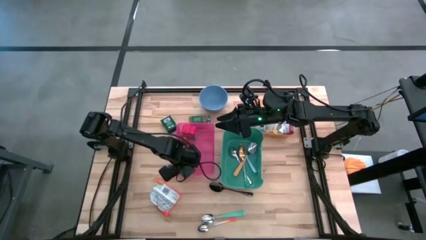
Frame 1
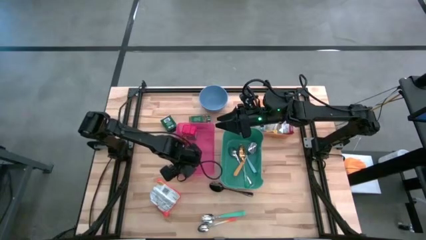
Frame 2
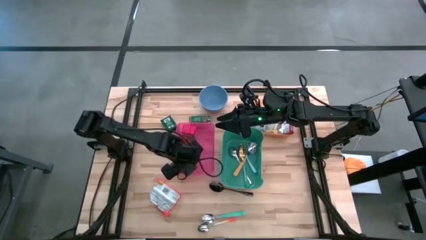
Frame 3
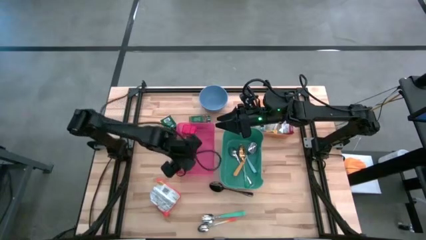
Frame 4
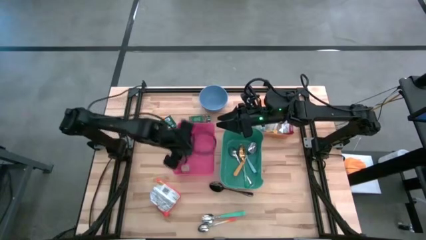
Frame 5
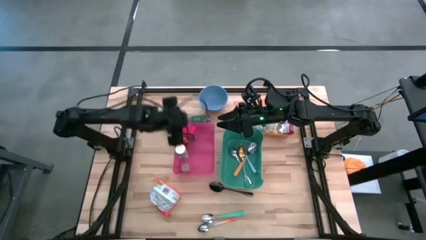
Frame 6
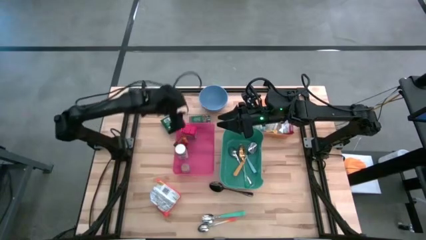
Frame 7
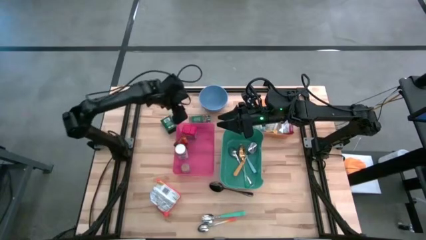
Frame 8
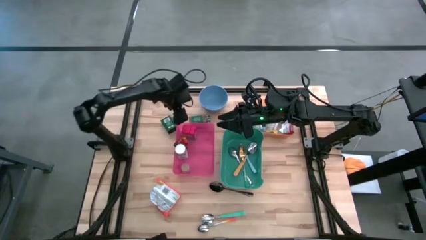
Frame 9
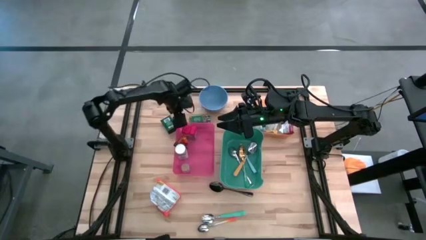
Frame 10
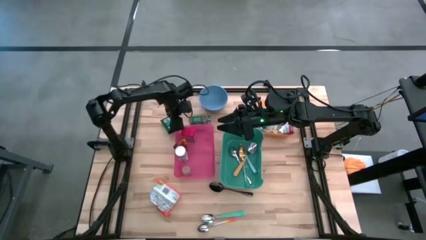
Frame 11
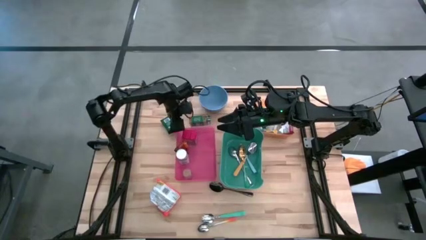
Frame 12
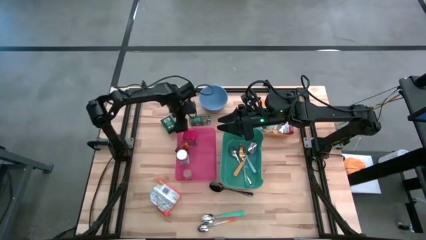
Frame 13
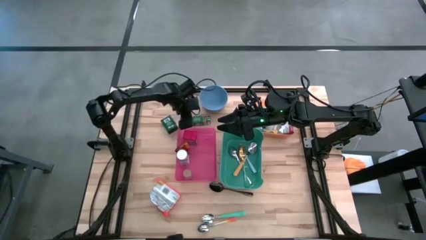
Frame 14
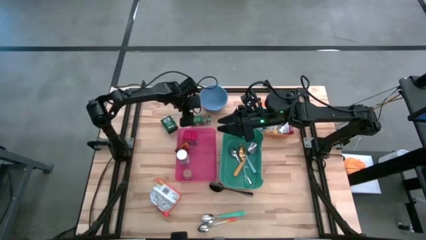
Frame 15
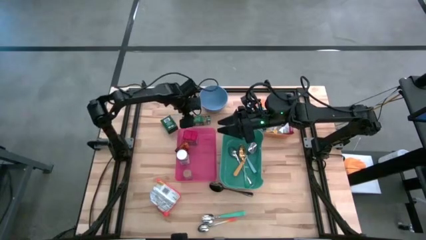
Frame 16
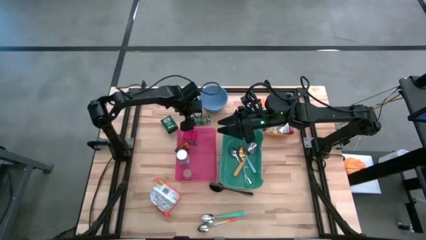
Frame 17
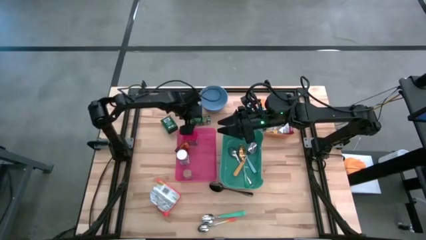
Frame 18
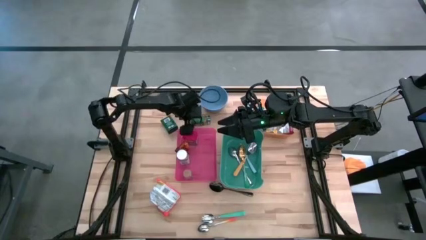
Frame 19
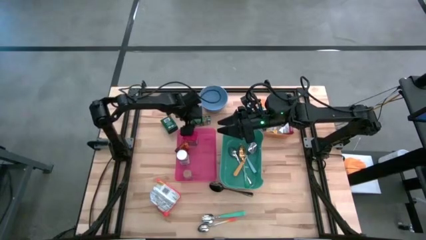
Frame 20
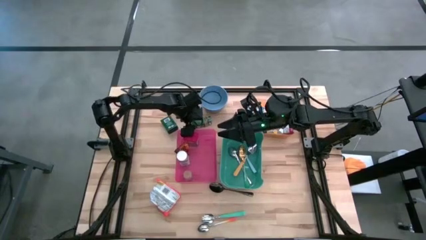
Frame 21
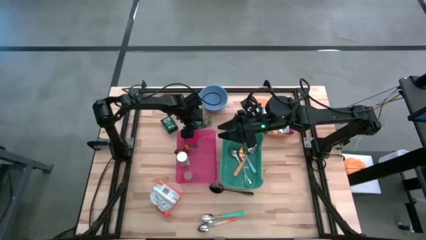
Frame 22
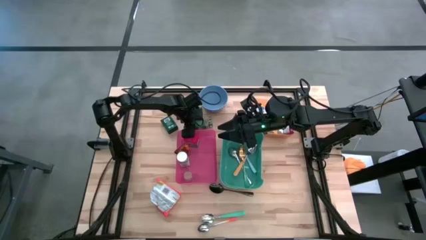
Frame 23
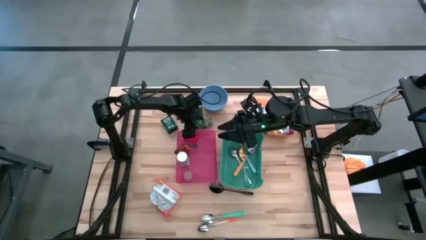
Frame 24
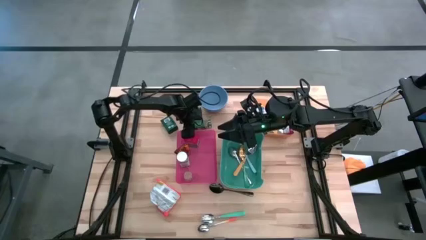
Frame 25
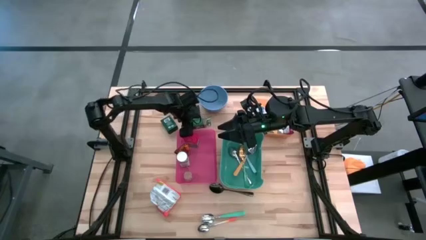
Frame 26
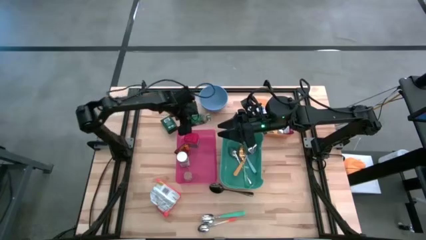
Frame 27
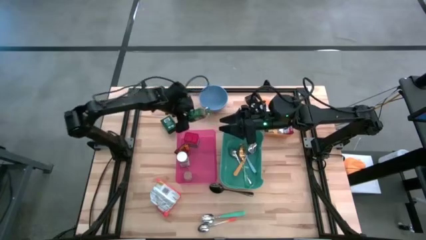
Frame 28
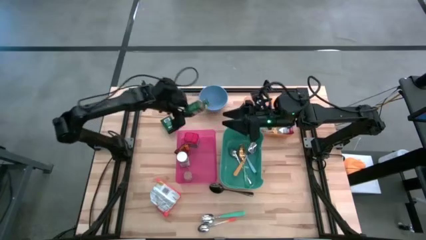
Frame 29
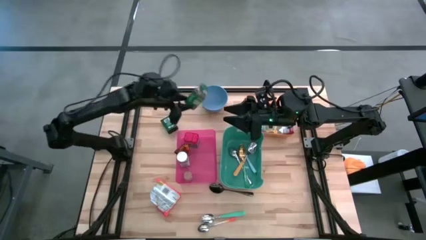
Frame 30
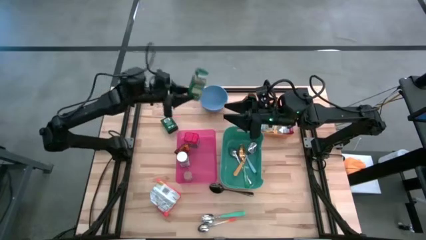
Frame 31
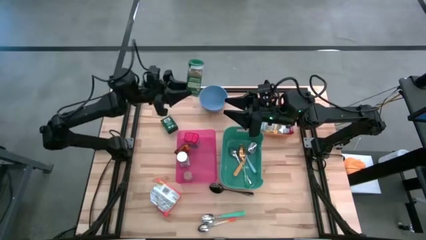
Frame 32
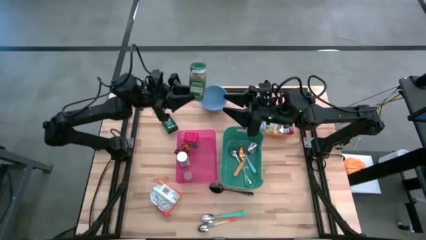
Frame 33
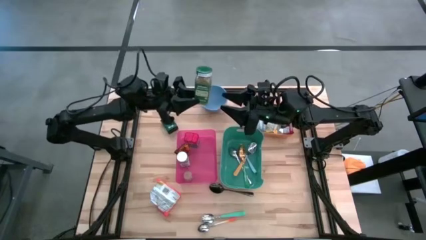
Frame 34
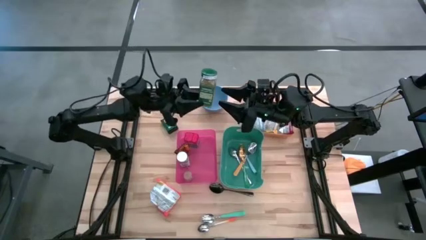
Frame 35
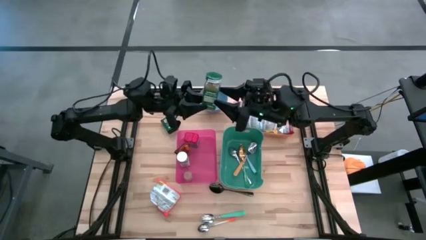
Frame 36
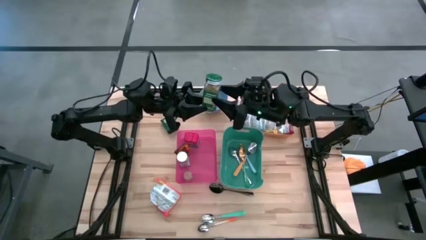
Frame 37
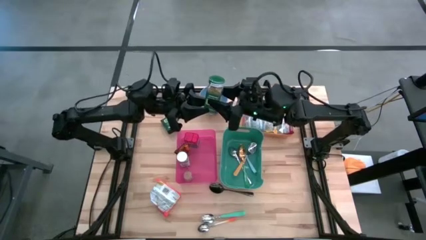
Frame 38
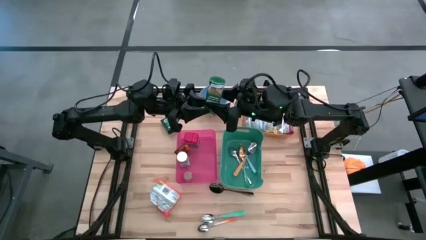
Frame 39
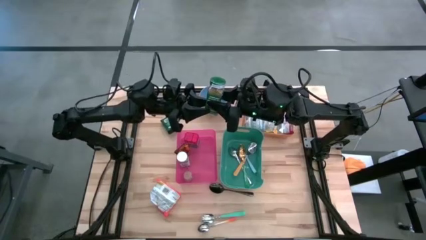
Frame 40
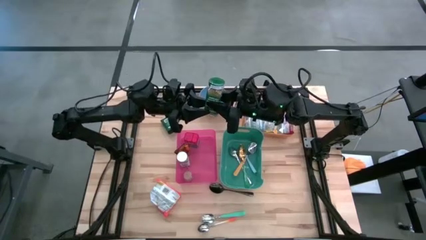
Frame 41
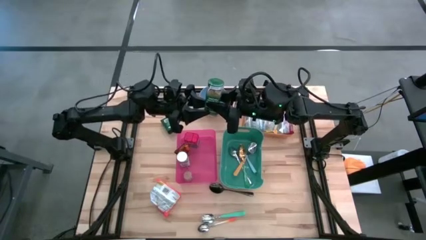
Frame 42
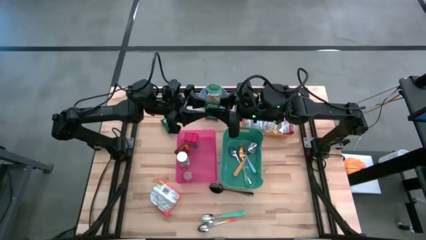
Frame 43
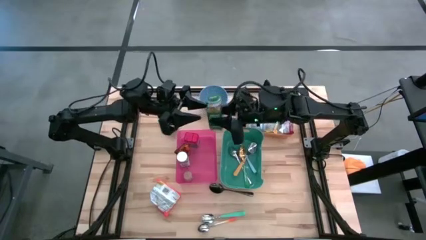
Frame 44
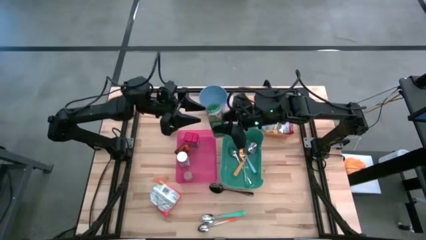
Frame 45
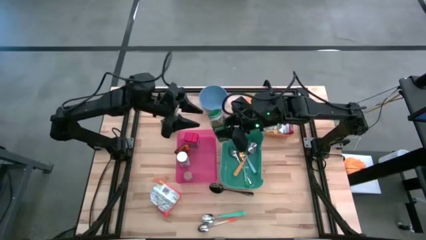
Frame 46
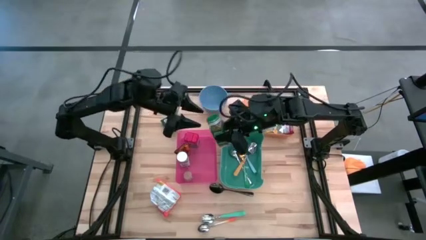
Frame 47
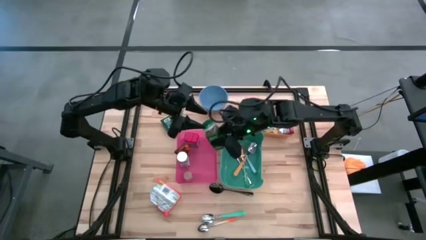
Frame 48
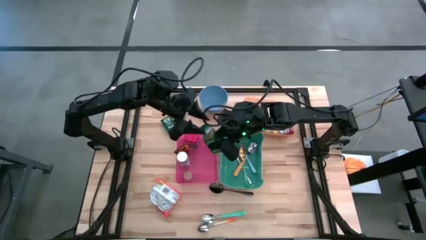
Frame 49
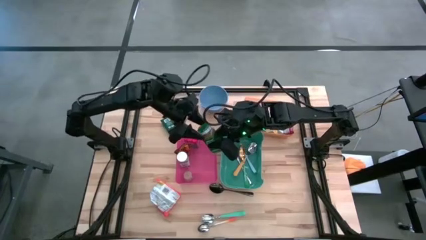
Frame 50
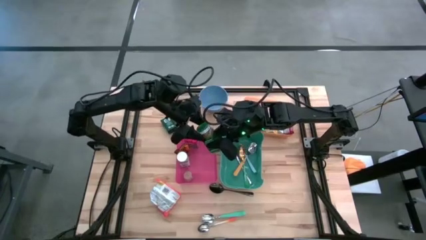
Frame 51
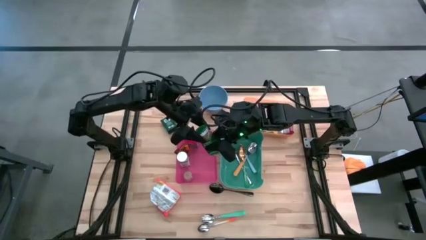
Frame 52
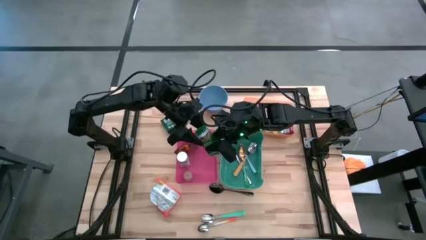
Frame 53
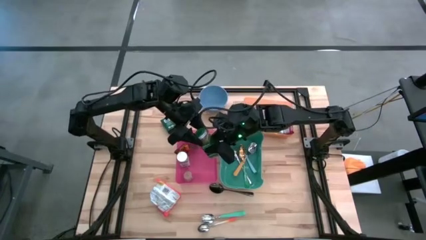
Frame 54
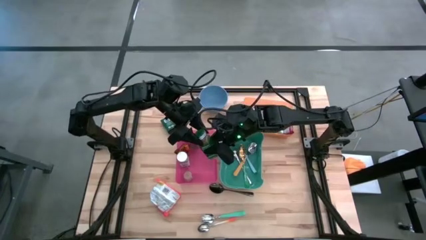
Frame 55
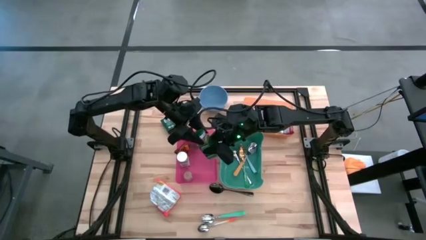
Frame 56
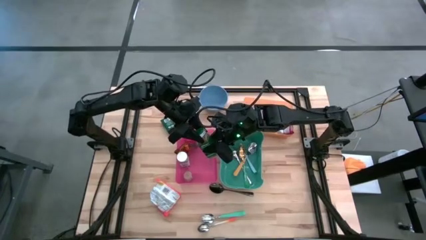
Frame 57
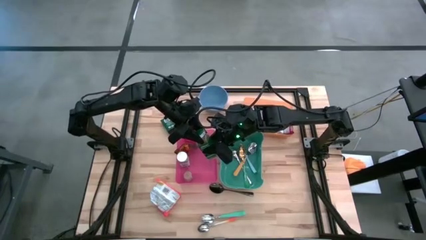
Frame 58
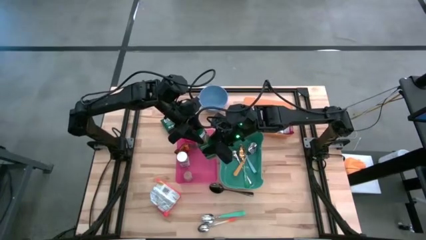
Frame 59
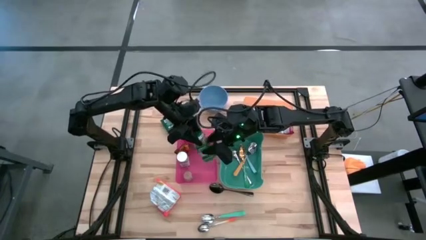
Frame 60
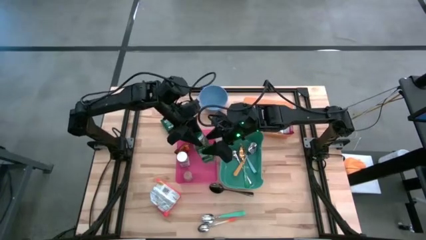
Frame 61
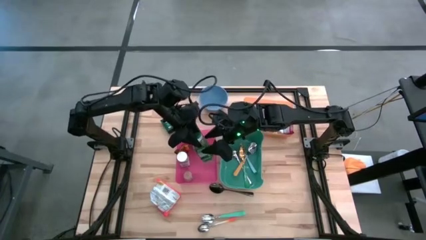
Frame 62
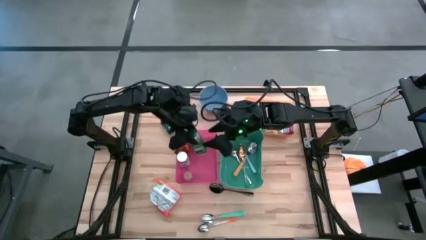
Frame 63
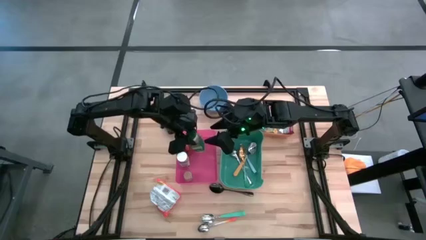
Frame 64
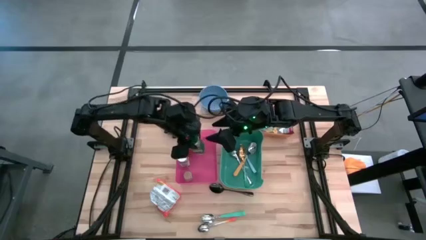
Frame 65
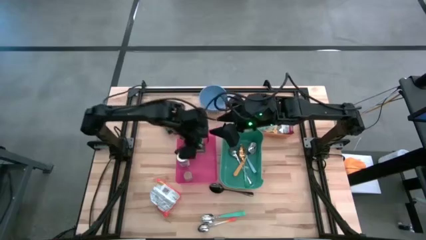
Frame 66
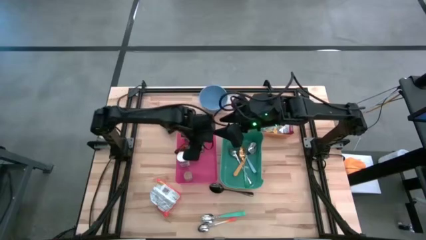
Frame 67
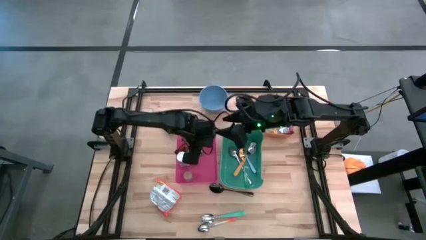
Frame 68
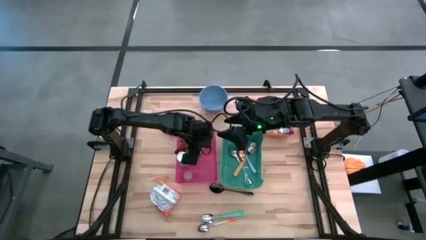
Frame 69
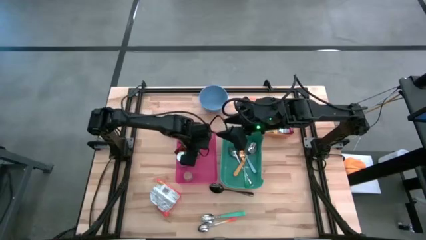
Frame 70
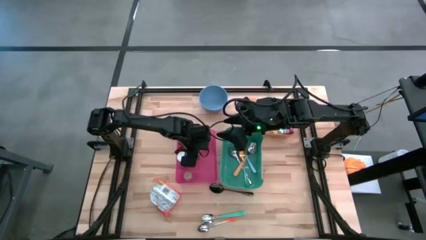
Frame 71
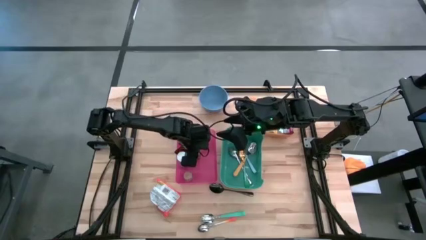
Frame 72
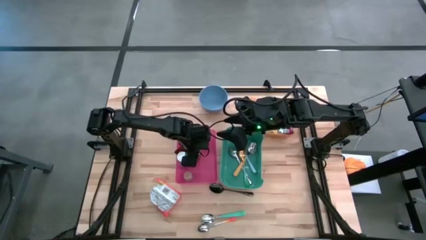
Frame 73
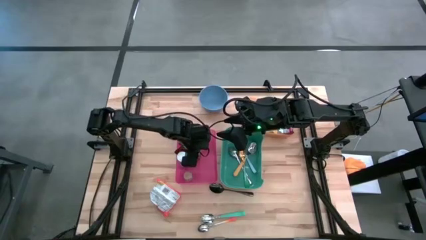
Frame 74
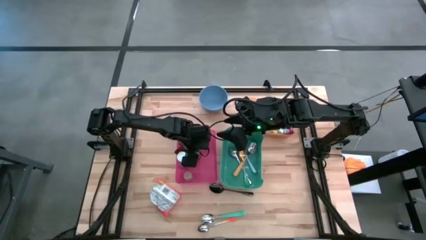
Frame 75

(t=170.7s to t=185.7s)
Put the green spice bottle into the red bin
